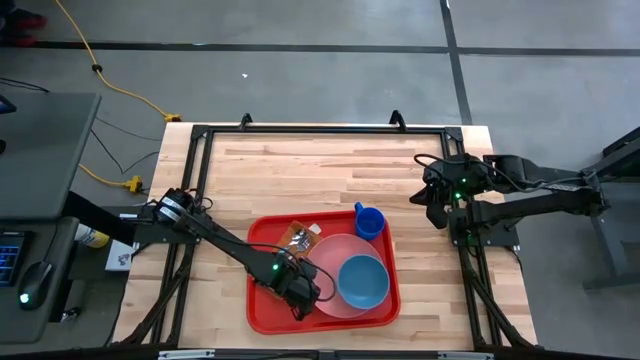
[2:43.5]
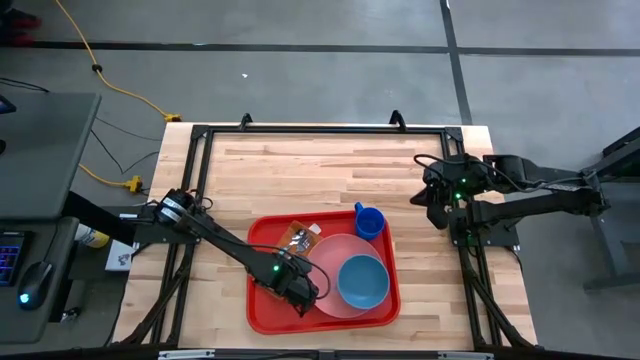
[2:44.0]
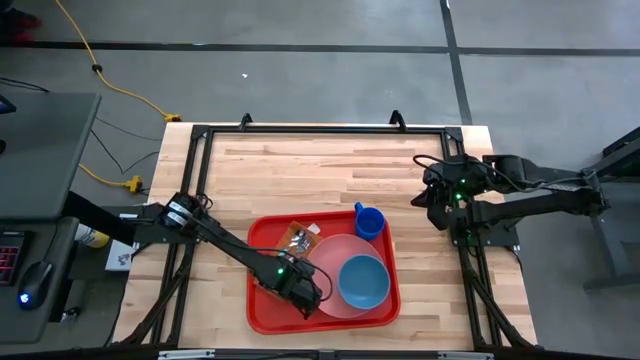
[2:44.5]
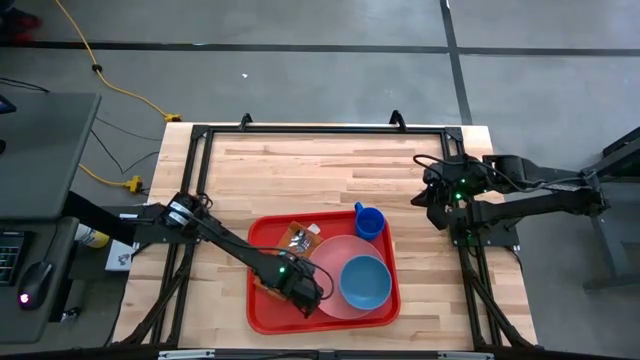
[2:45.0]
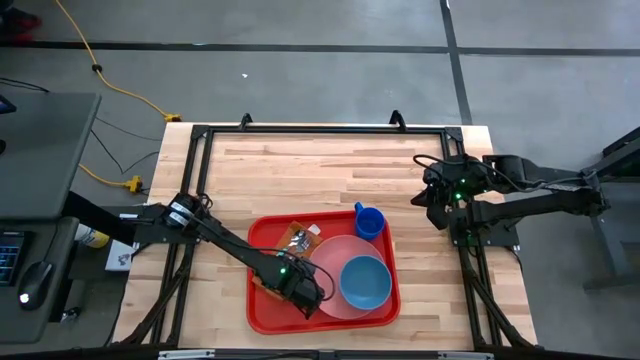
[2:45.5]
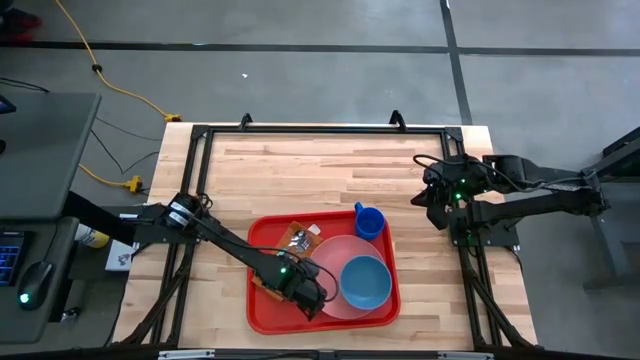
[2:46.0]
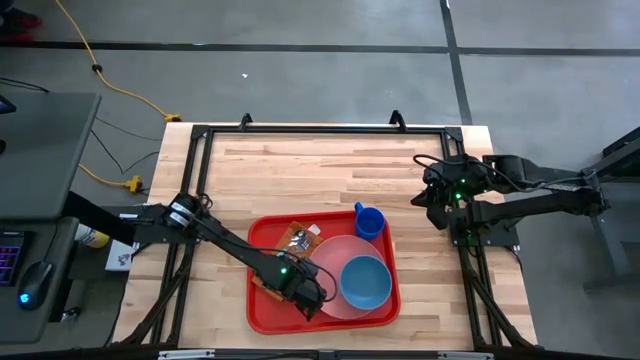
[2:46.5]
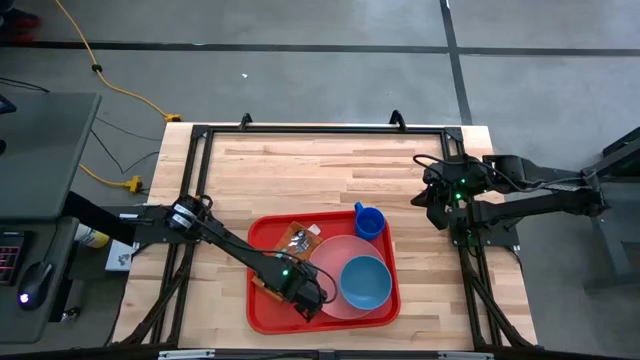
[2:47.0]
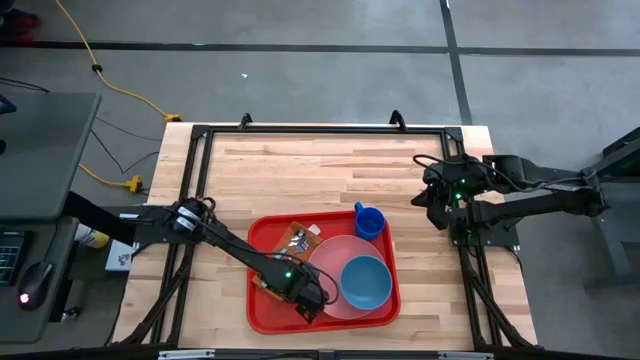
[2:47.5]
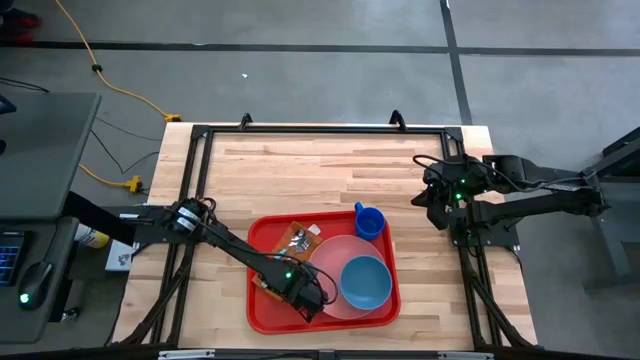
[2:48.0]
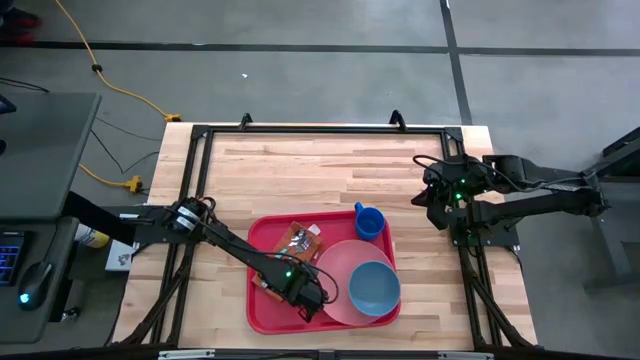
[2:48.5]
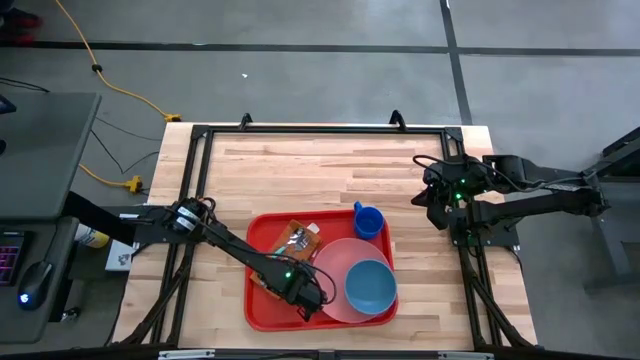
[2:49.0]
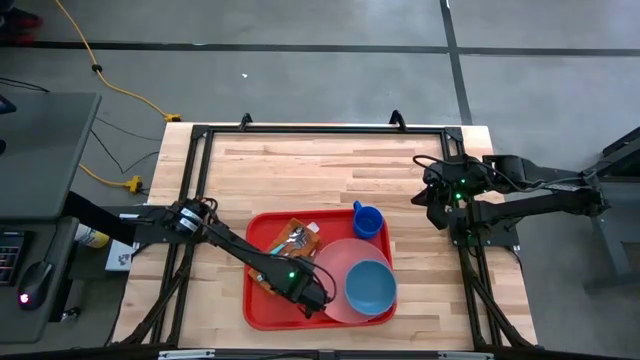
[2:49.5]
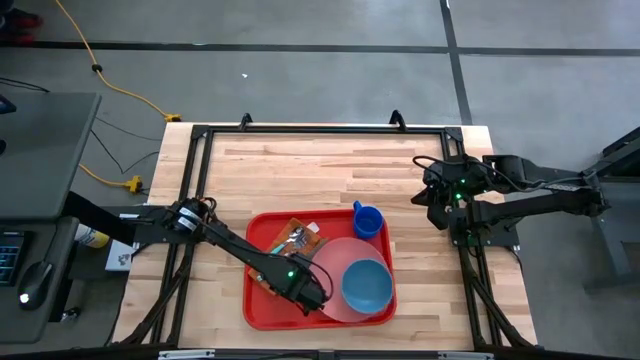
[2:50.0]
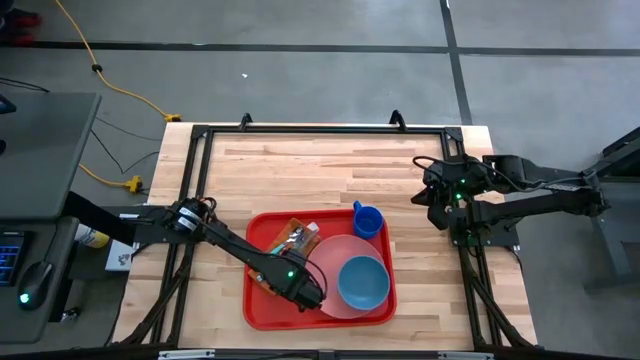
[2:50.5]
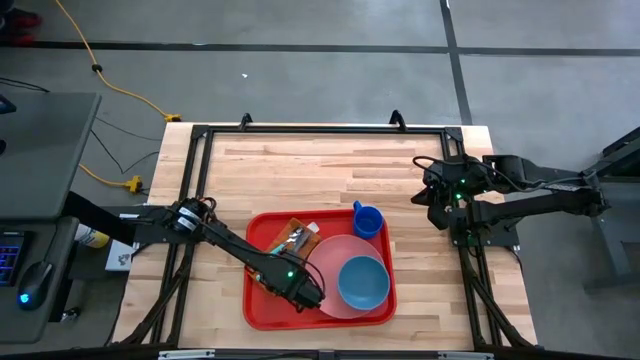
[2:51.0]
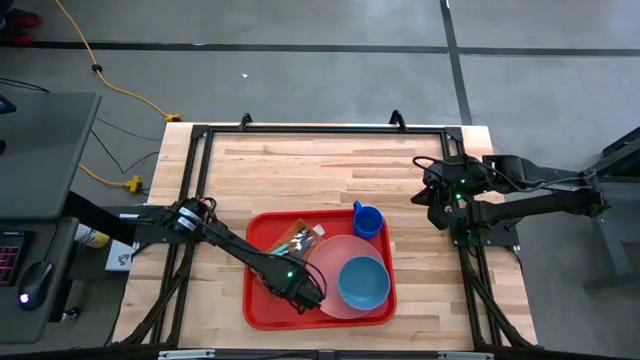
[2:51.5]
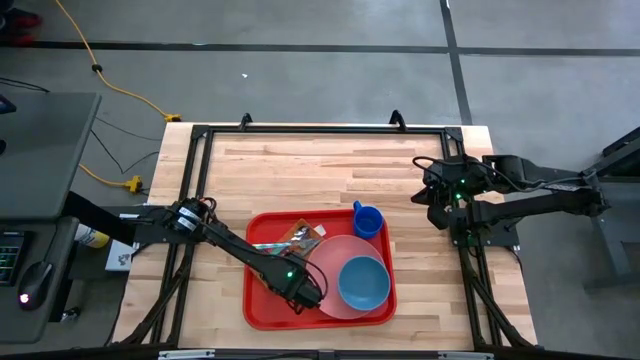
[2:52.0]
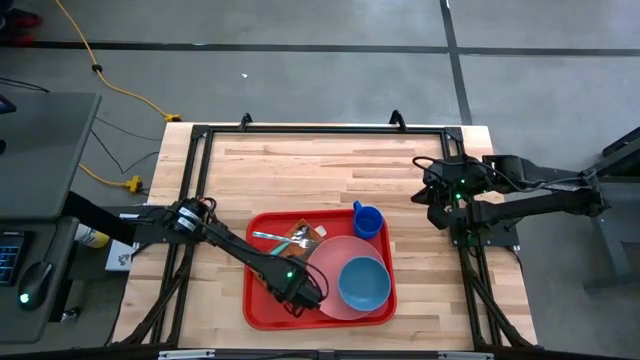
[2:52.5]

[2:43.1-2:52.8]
Task: Set up tray
Adjust the knife on the orange napkin

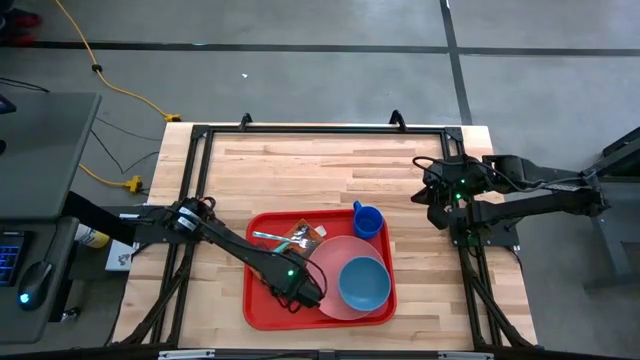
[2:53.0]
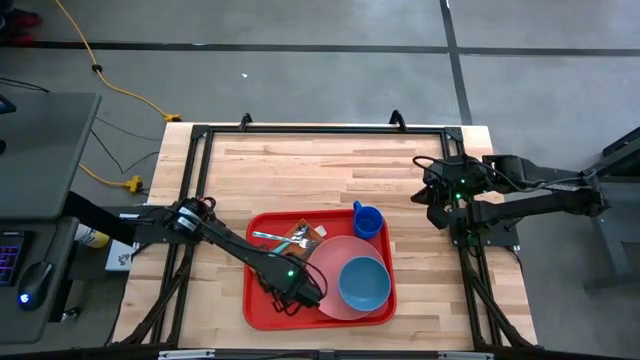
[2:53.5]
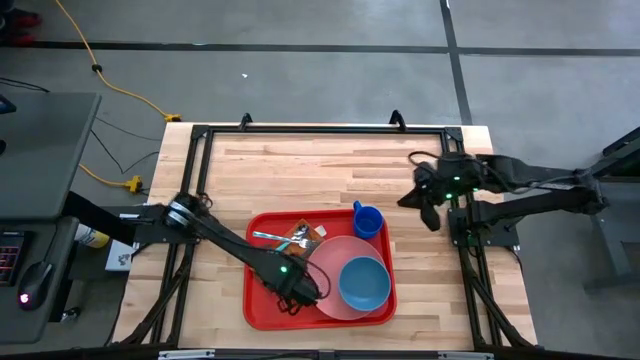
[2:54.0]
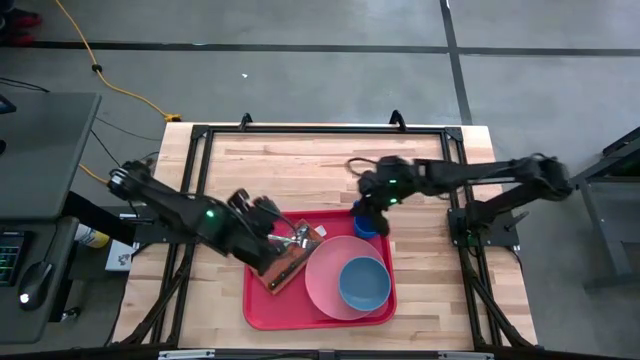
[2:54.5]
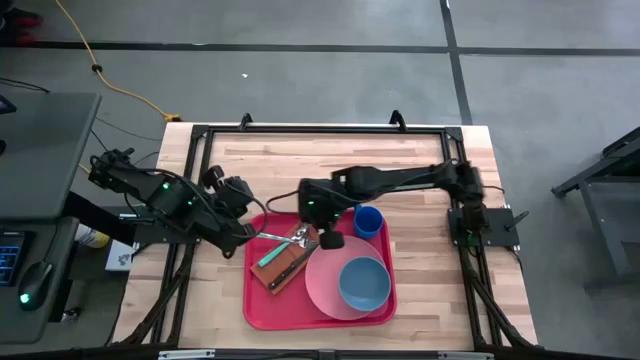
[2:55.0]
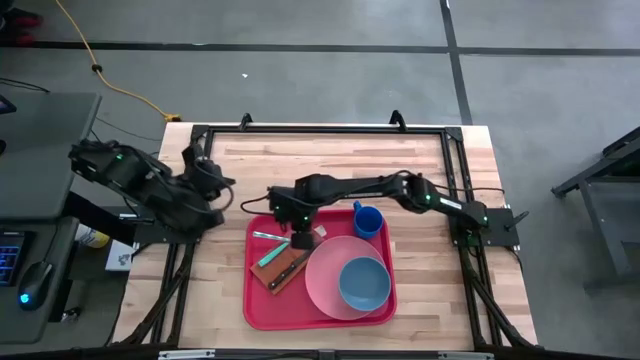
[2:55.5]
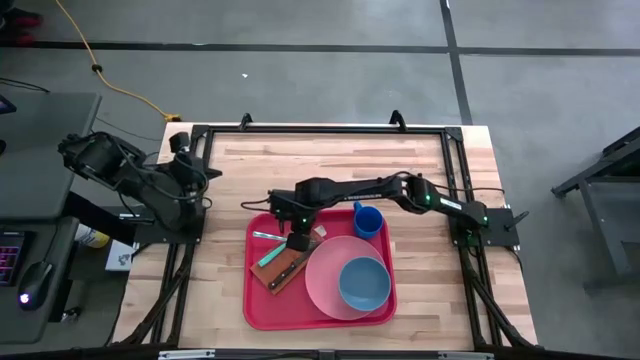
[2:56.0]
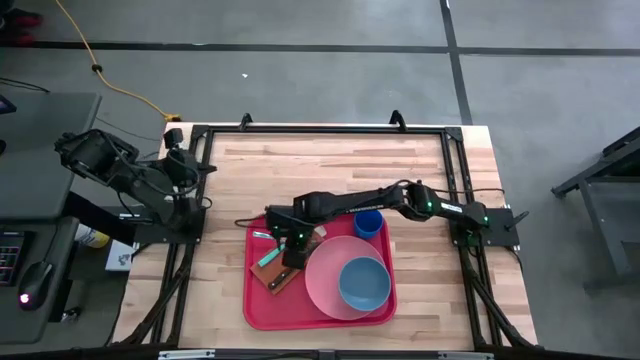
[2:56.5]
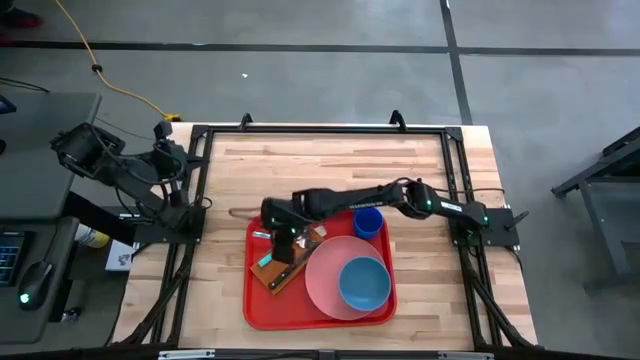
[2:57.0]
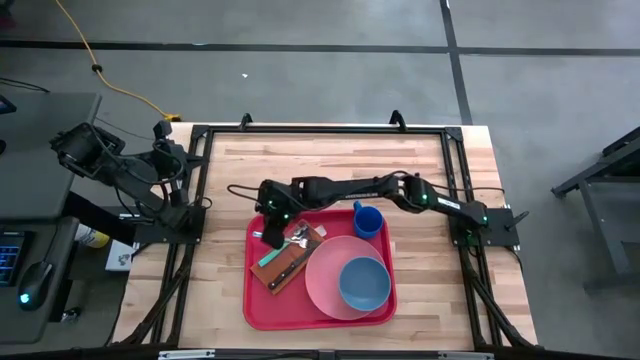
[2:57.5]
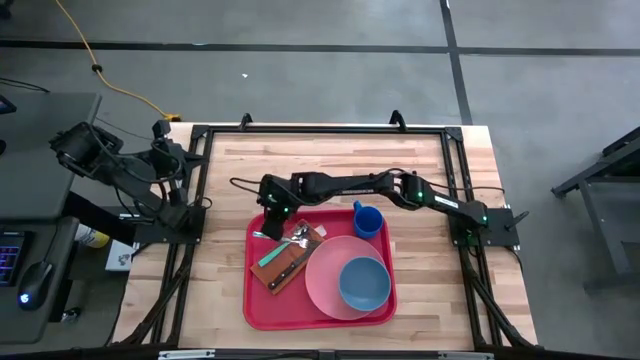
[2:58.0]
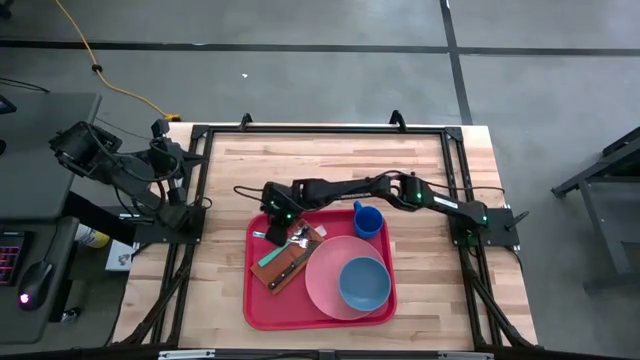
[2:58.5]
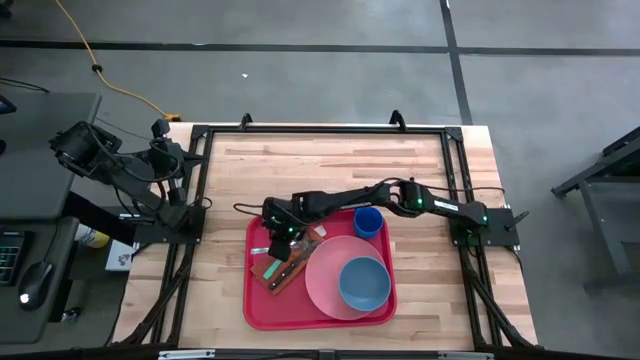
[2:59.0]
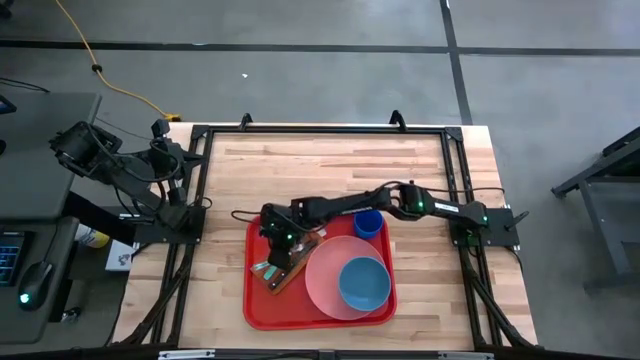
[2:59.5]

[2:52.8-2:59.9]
Adjust the blue fork on the orange napkin

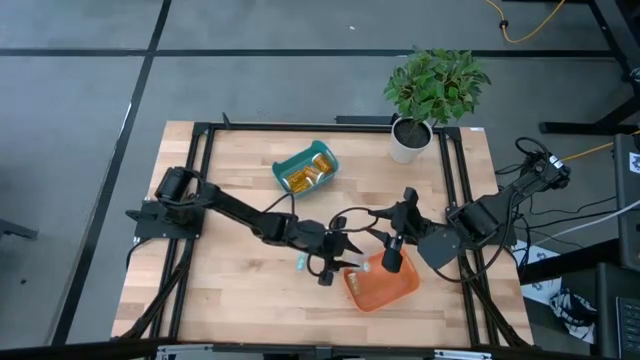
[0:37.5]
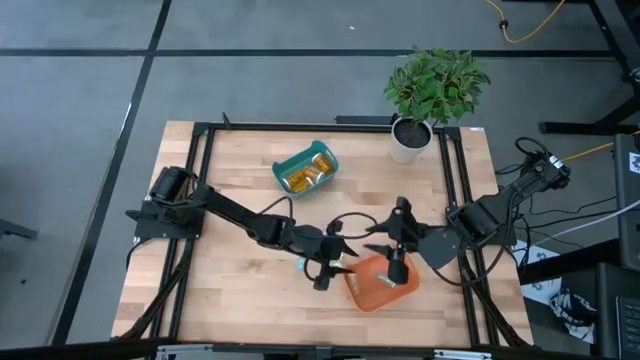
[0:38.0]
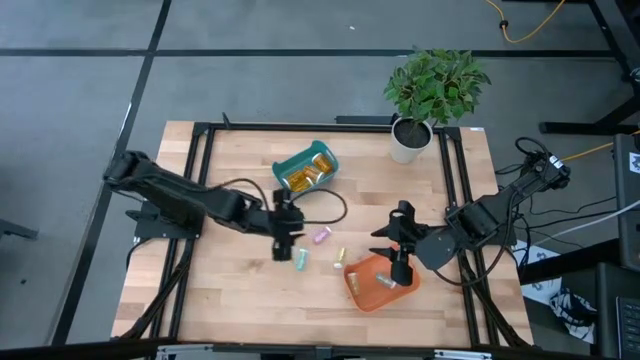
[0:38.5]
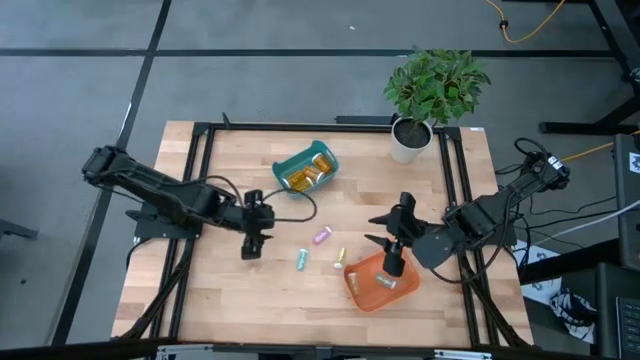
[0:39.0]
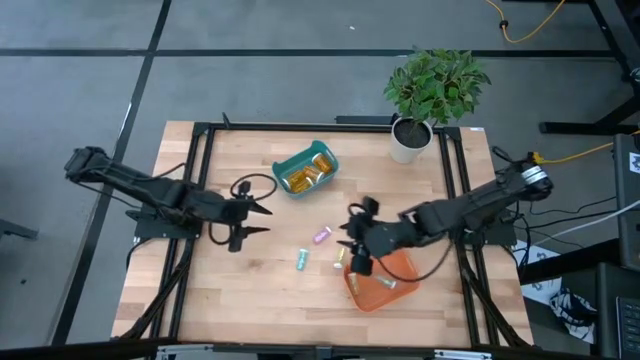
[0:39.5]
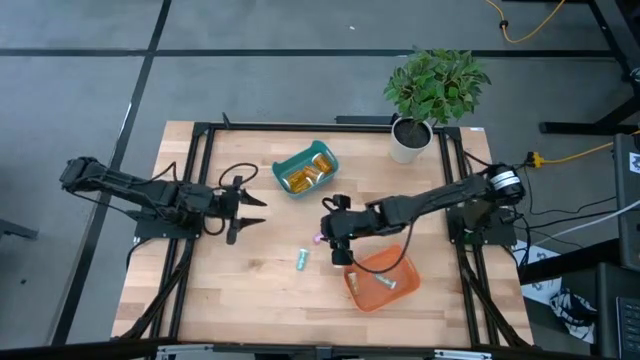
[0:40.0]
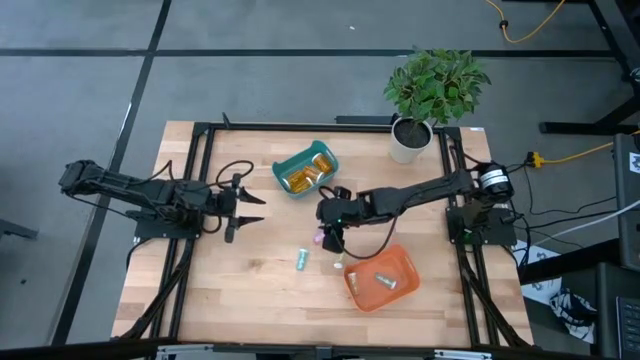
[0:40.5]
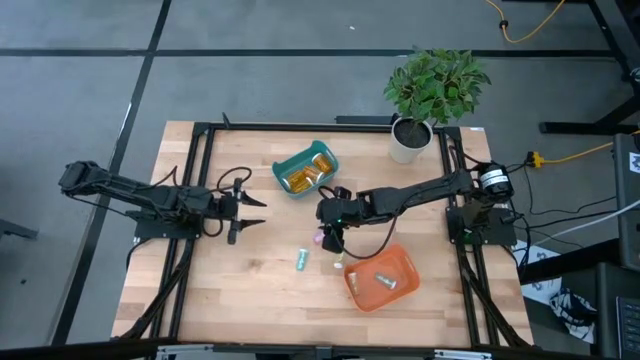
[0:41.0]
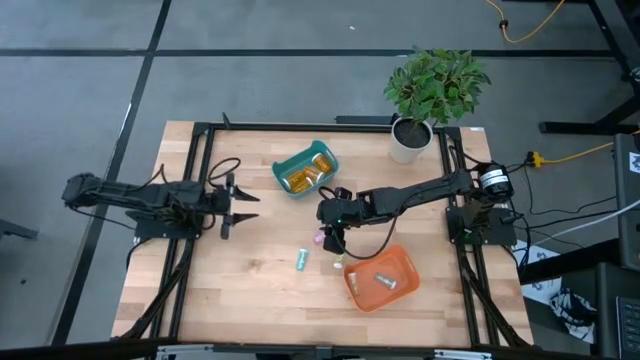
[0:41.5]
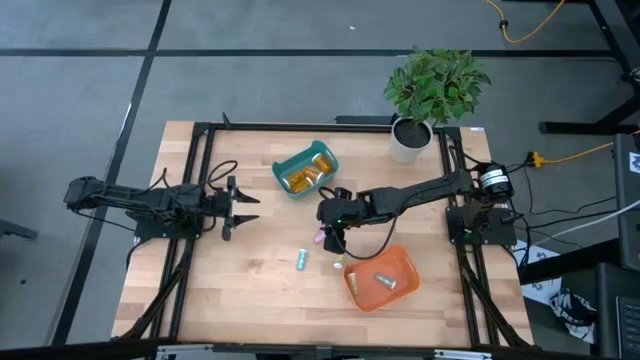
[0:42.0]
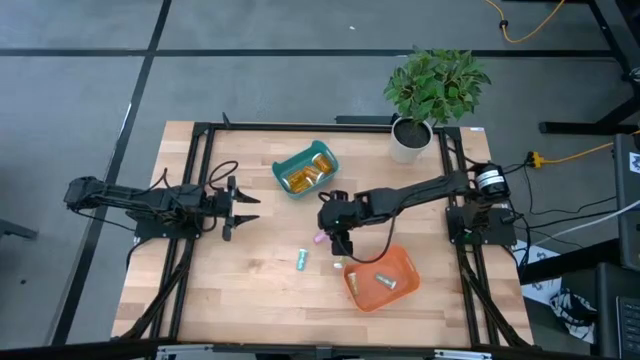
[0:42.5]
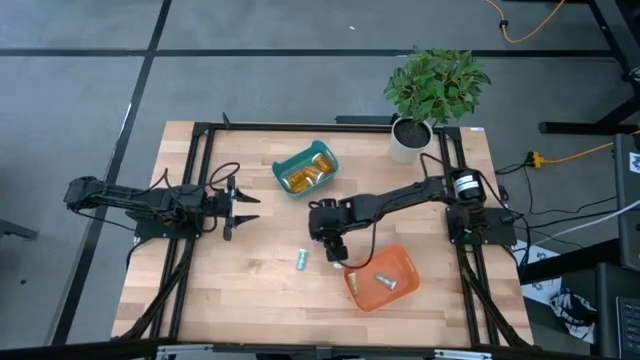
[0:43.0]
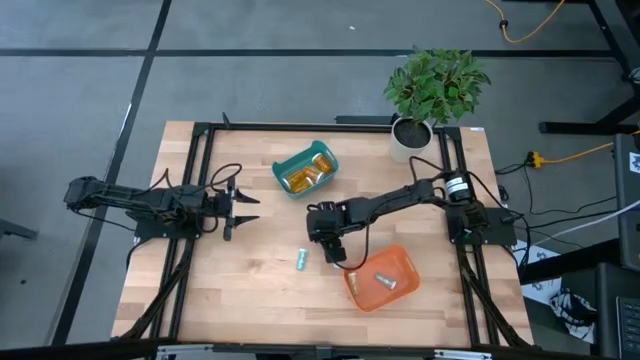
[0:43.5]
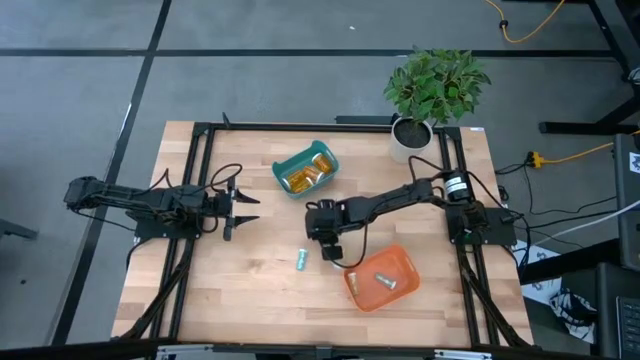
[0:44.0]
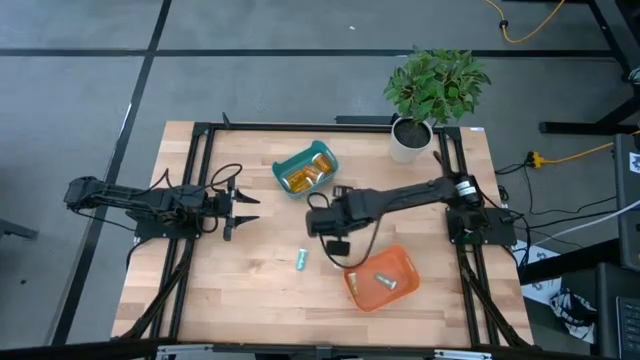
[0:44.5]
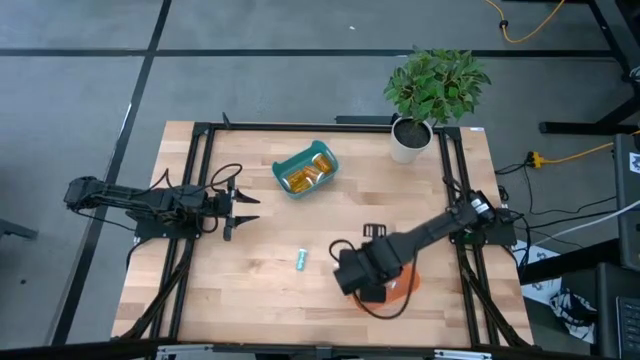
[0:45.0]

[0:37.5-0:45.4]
Task: Pick and place medicine bottles into bin by pill shape (circle, oval)
Put the small purple pill bottle into the orange bin
